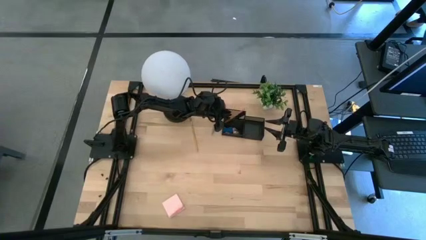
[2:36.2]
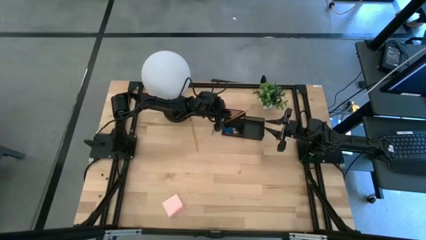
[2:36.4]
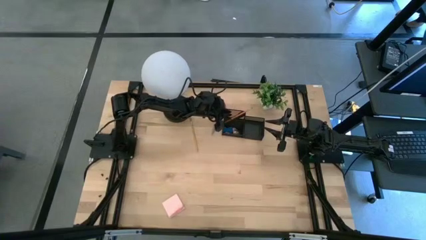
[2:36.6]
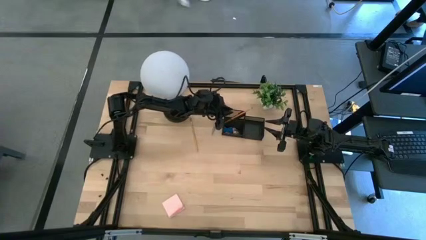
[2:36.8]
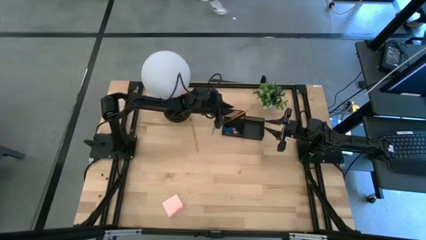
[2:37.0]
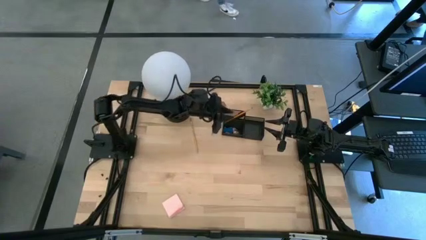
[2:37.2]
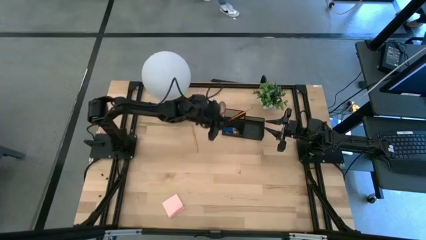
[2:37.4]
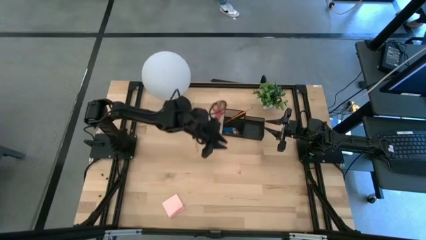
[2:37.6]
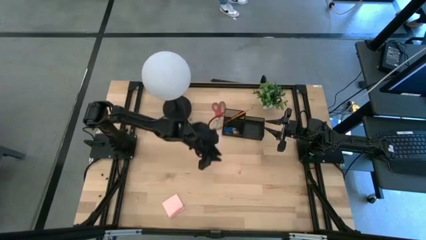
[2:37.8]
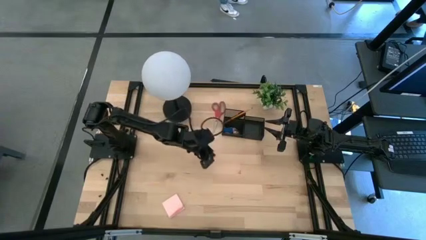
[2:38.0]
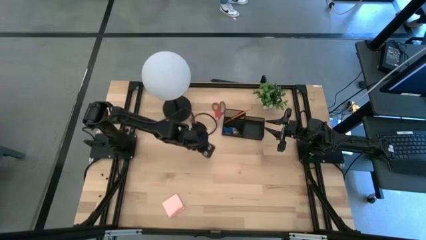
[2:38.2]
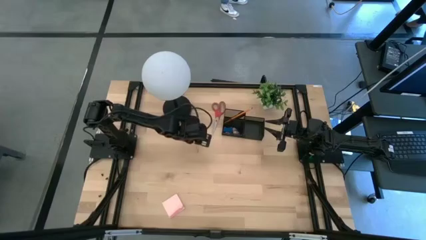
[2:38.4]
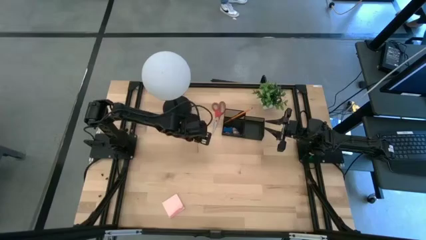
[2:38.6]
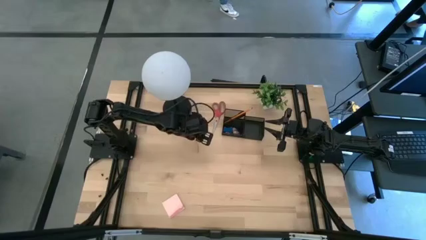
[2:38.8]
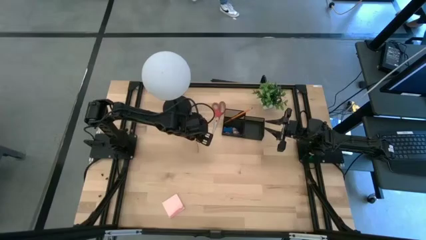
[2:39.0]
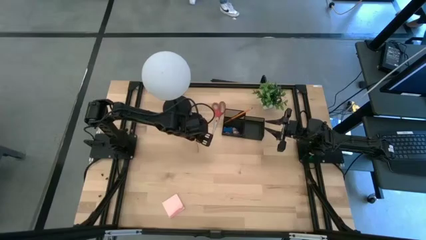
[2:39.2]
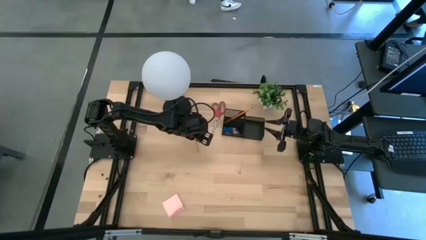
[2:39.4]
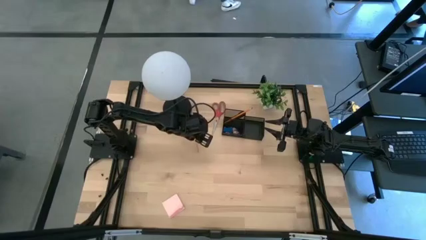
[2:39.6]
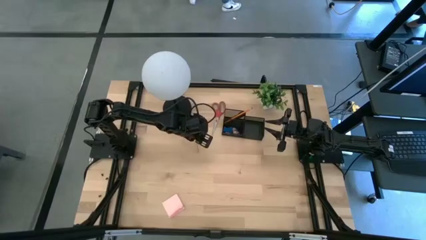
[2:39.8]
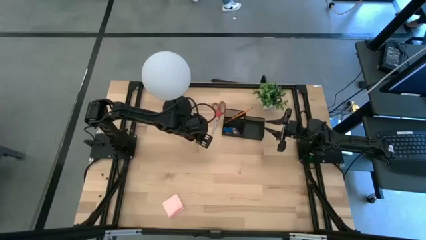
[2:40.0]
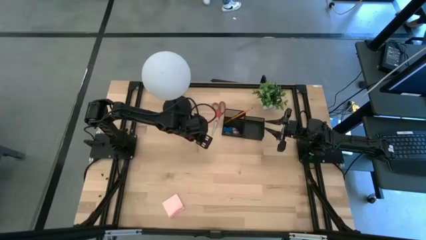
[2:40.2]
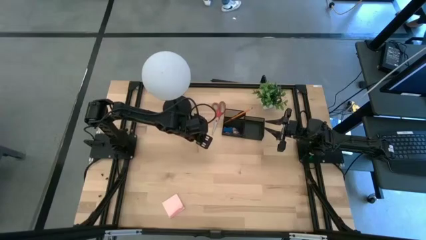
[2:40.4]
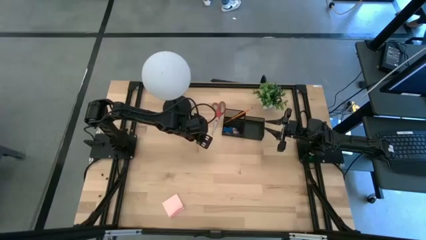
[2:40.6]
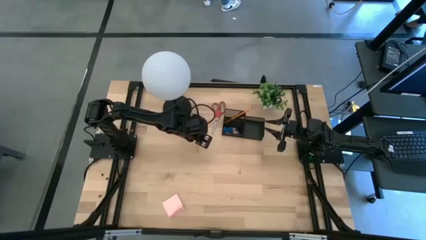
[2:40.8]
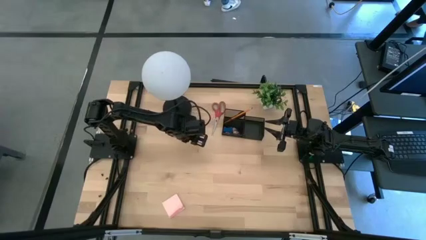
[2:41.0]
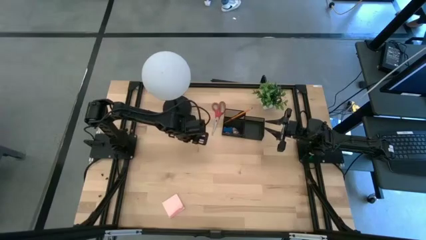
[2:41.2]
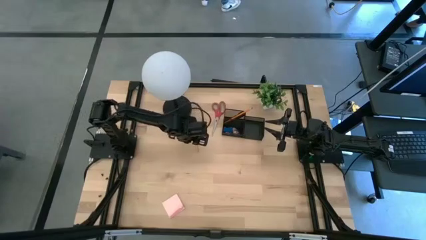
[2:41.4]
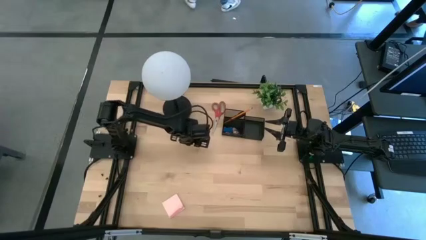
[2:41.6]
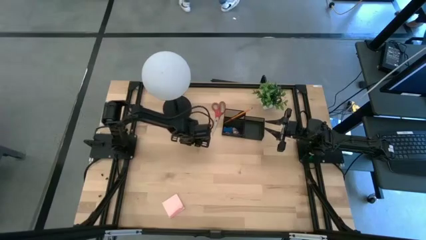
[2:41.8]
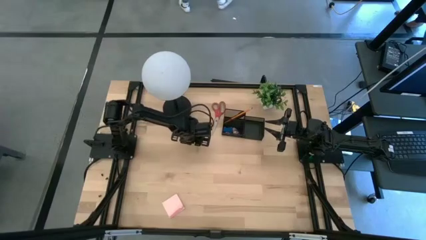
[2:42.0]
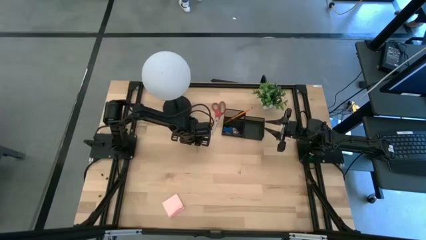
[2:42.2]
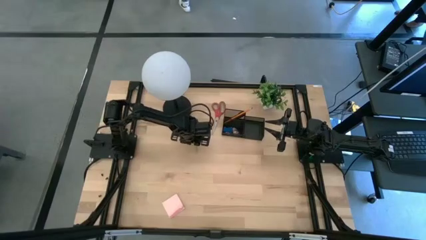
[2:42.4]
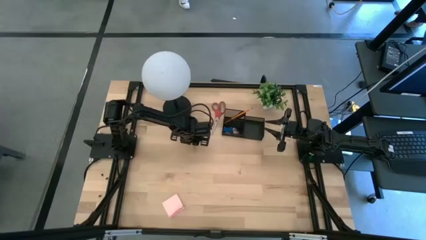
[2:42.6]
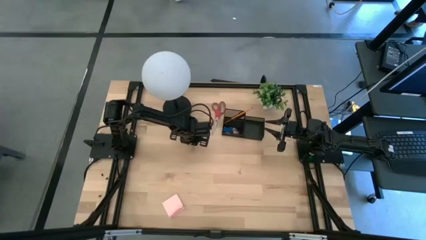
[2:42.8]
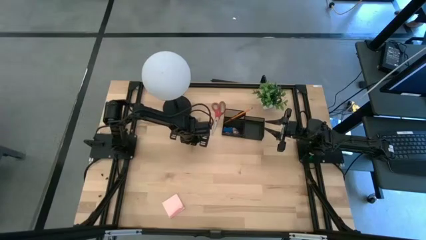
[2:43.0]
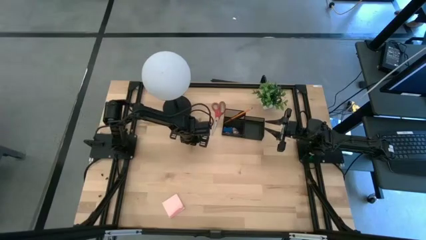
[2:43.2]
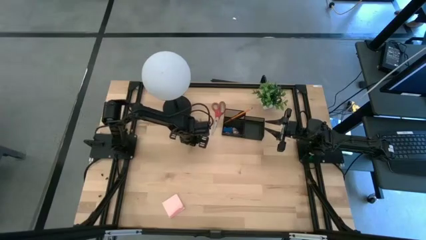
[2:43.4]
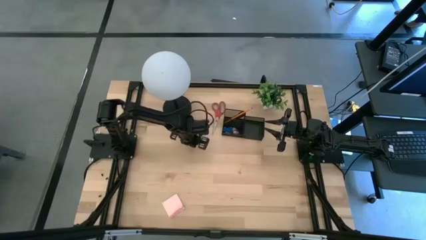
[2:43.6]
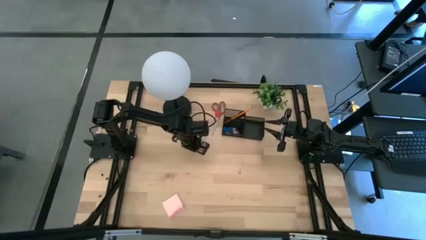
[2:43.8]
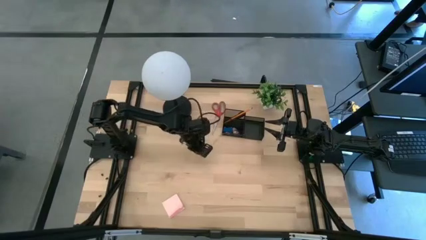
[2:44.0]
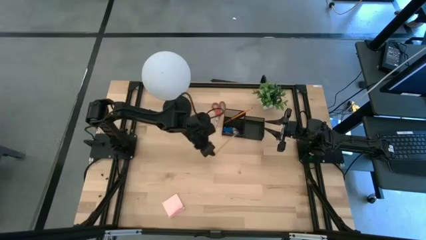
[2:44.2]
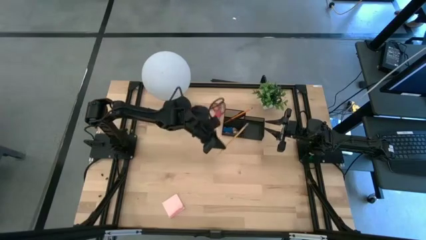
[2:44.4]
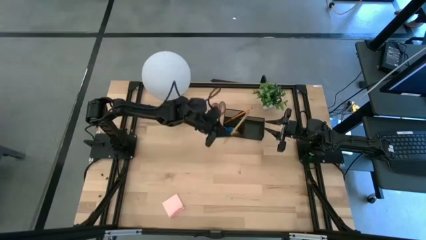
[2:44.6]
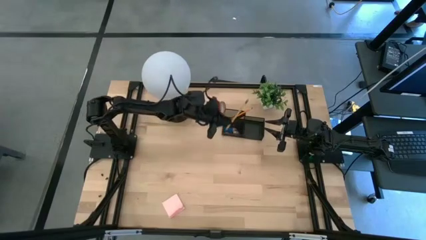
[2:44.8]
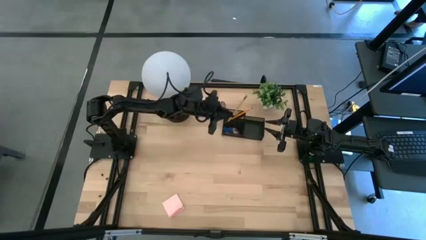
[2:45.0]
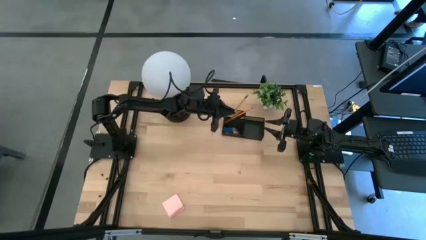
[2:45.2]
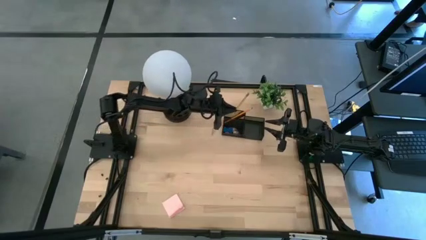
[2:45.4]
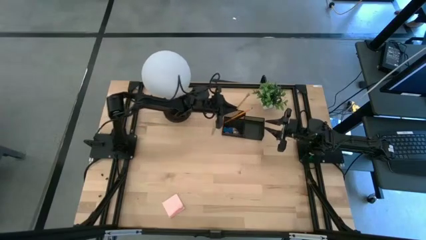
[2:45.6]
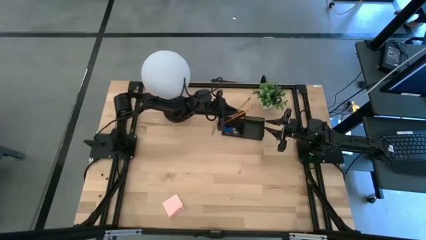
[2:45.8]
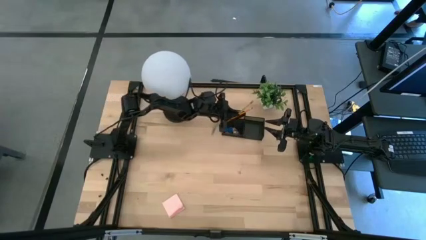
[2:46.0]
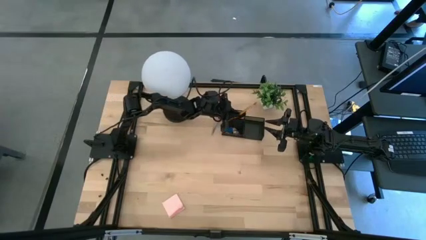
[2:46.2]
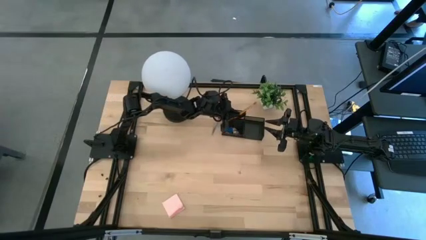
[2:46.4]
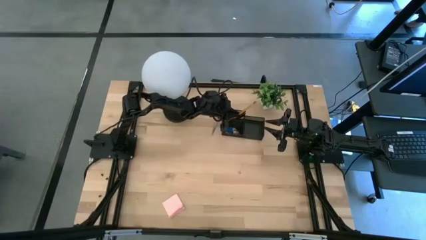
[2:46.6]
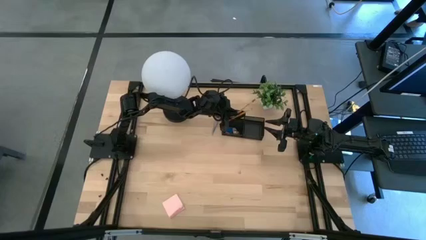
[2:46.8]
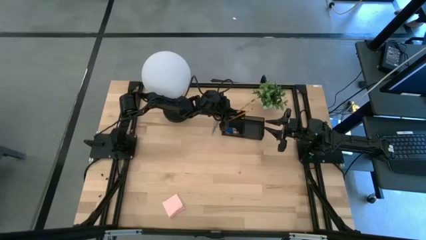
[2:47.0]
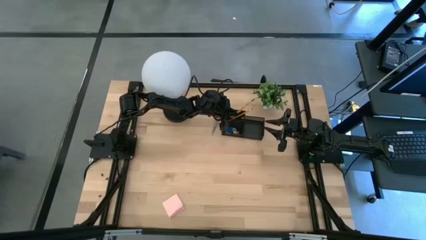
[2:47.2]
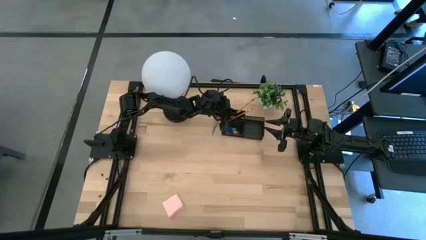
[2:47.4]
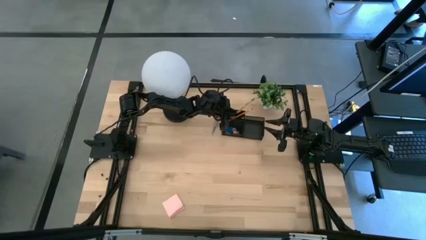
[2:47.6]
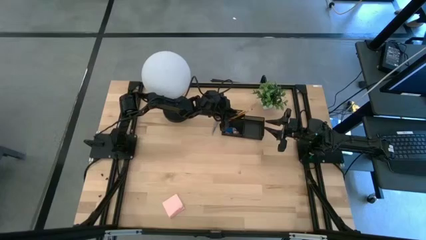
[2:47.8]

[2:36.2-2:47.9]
Task: Pick and place office supplies into organizer
Put the yellow pencil into the black desk organizer

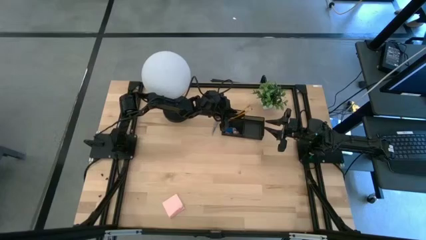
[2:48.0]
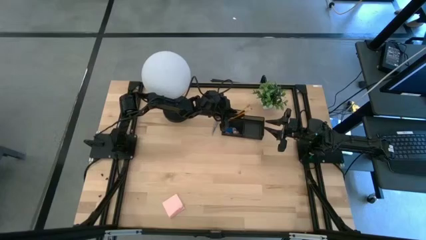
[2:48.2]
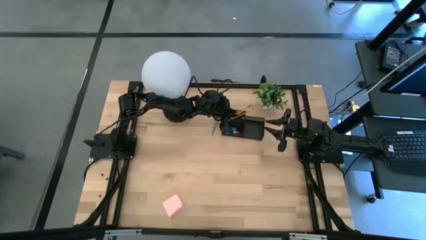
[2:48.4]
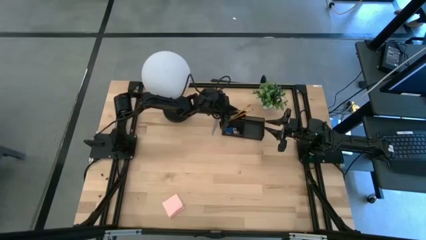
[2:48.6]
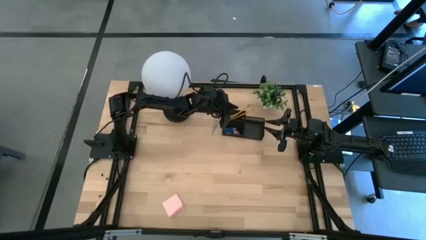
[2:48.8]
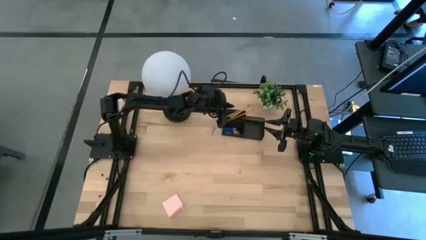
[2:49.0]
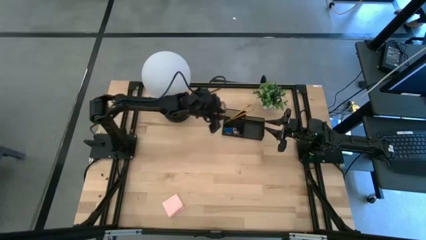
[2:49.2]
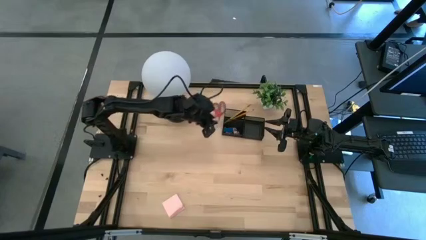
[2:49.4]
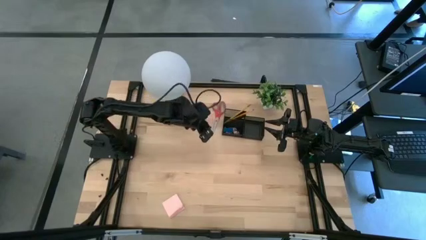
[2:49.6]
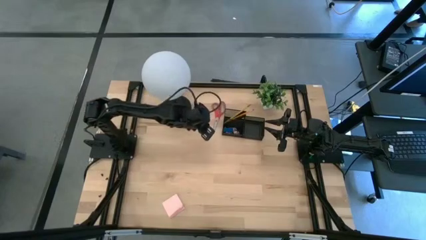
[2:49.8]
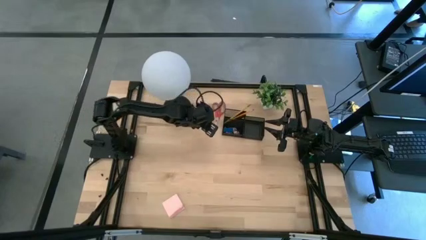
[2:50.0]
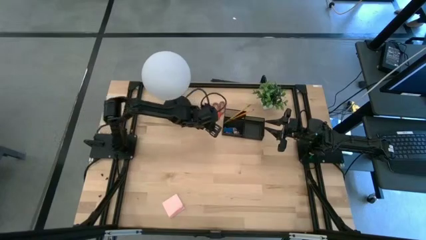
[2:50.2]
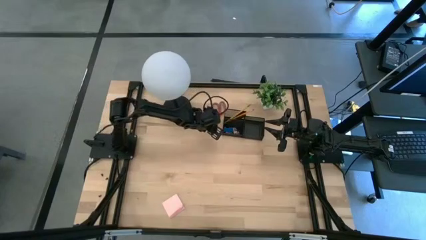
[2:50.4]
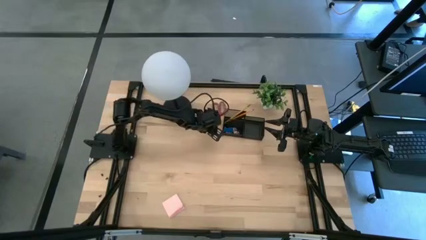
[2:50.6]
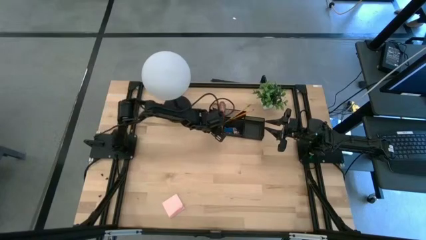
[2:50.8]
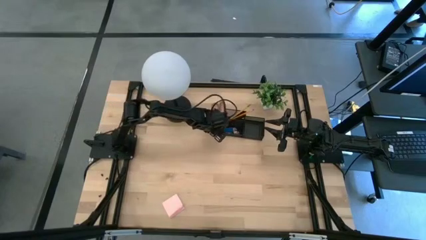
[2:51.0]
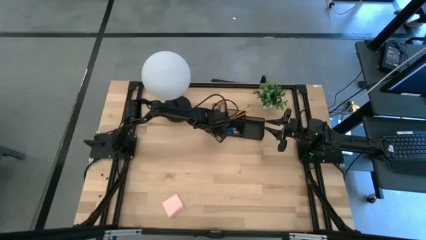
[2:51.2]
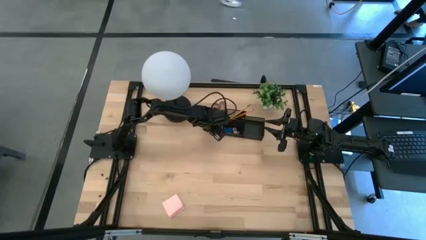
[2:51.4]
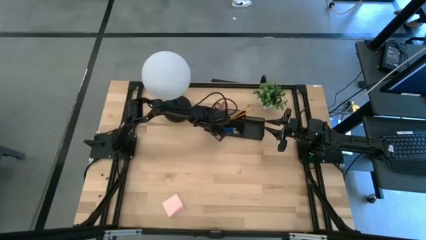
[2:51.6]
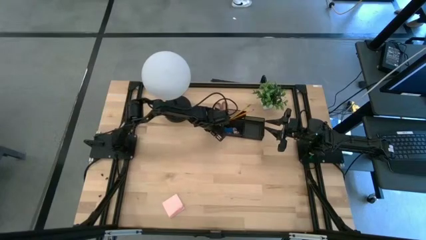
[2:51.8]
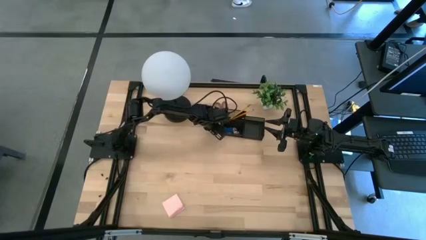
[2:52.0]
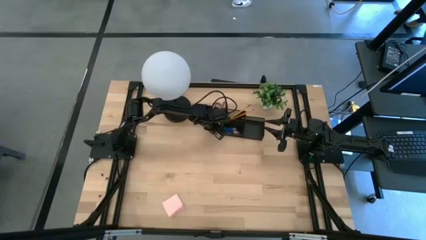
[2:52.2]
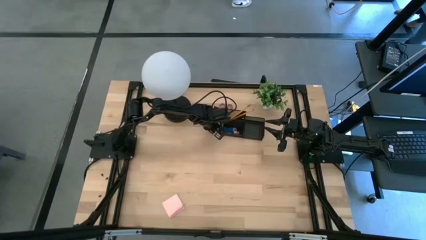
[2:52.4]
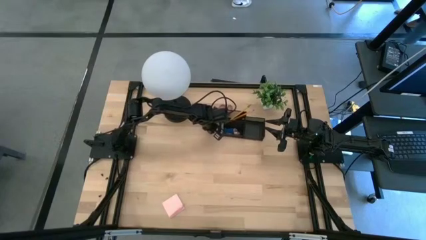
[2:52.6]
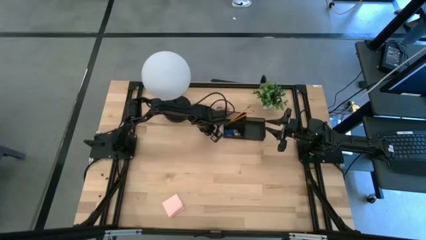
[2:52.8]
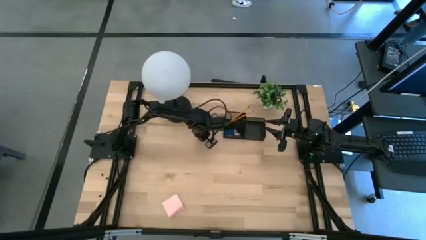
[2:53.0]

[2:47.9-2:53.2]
Put the red scissors into the black desk organizer
